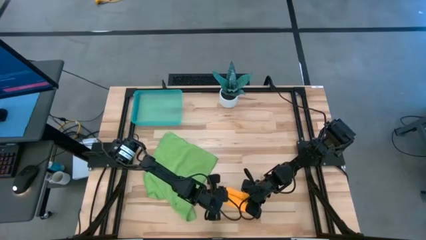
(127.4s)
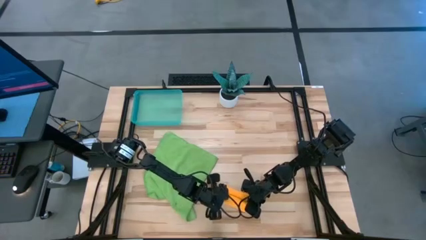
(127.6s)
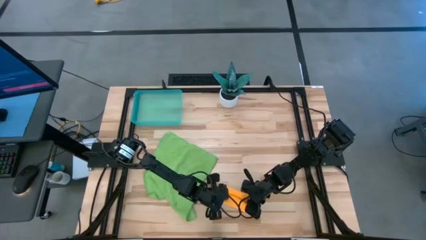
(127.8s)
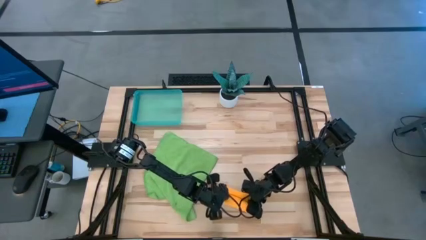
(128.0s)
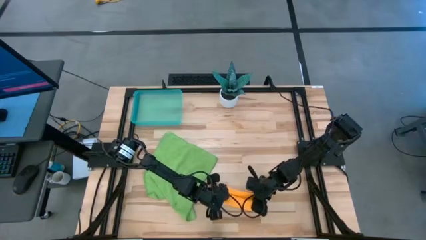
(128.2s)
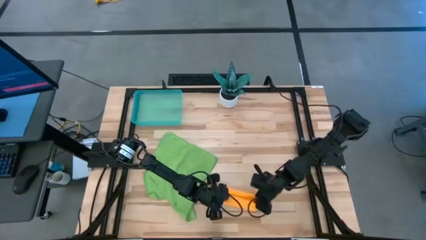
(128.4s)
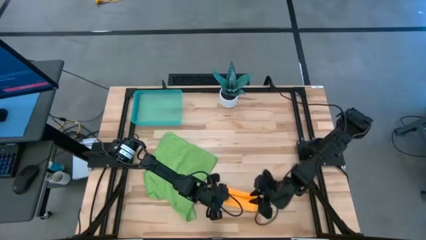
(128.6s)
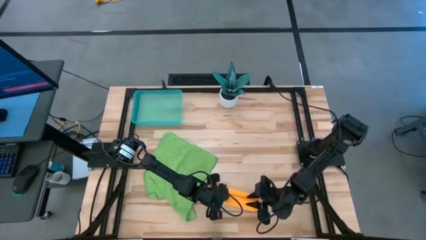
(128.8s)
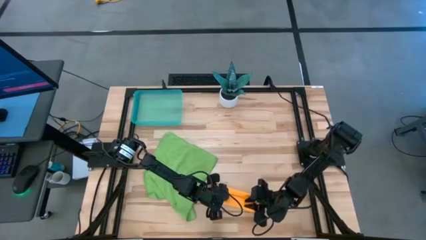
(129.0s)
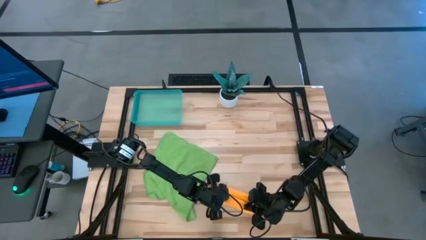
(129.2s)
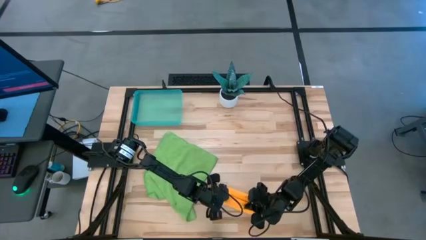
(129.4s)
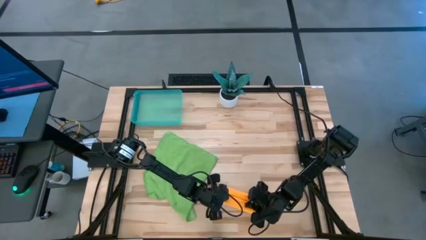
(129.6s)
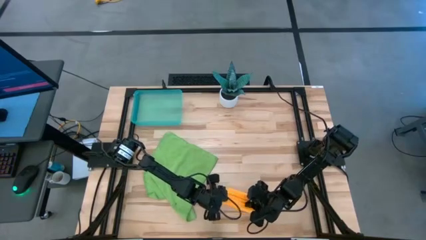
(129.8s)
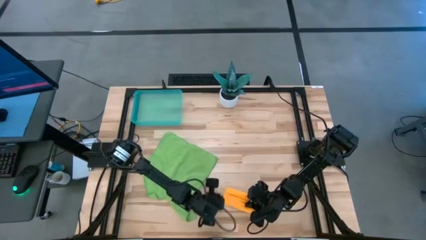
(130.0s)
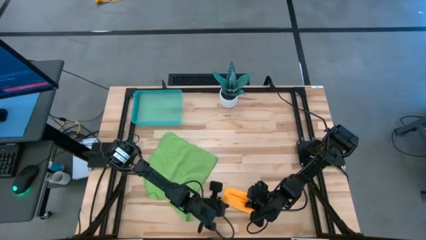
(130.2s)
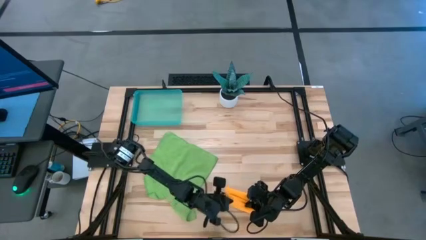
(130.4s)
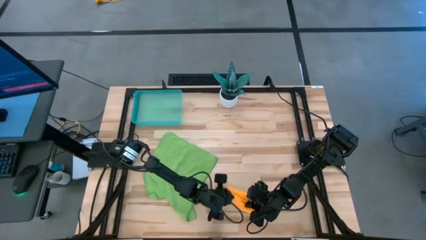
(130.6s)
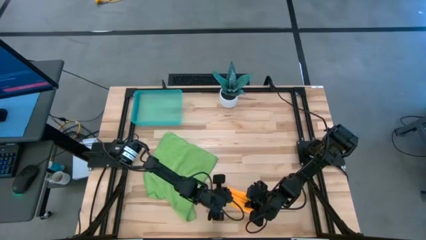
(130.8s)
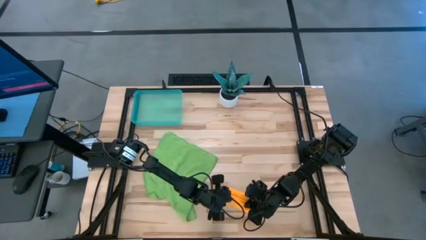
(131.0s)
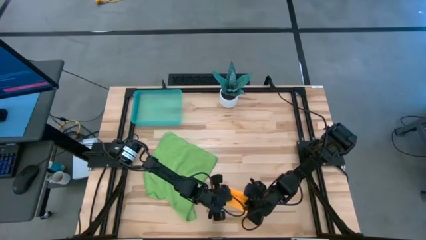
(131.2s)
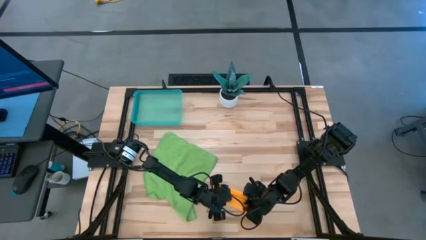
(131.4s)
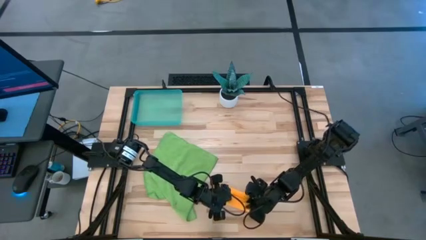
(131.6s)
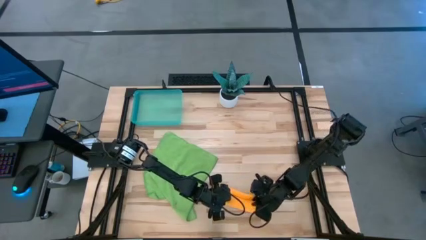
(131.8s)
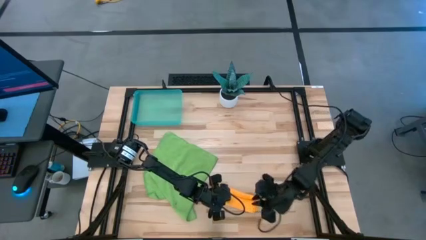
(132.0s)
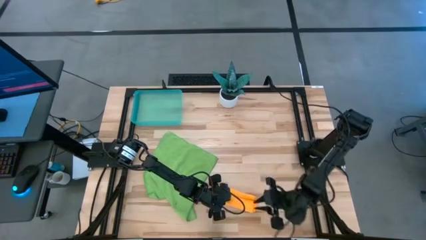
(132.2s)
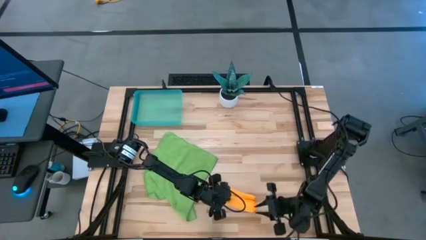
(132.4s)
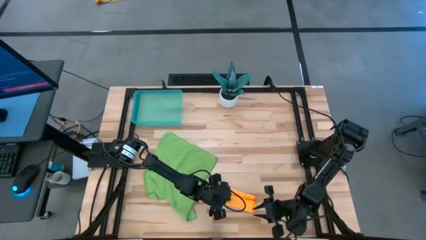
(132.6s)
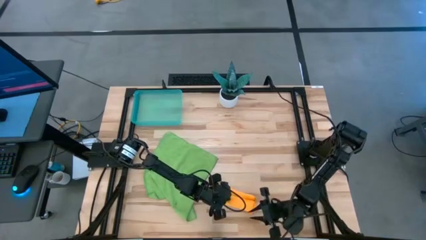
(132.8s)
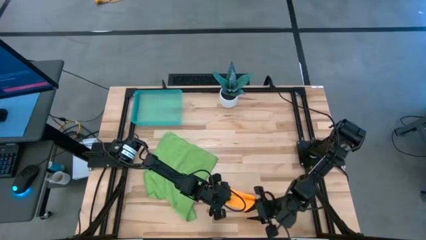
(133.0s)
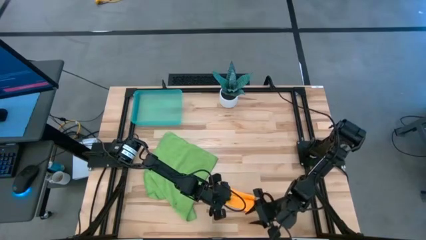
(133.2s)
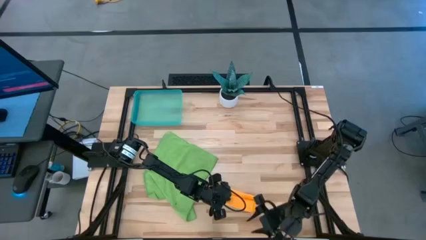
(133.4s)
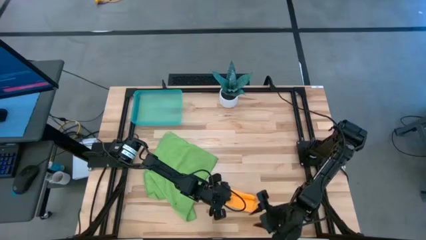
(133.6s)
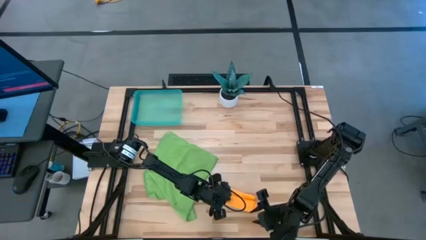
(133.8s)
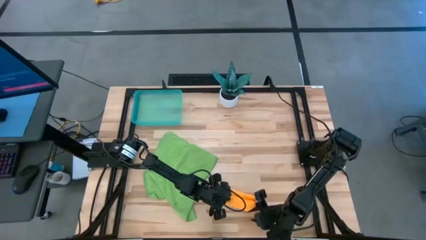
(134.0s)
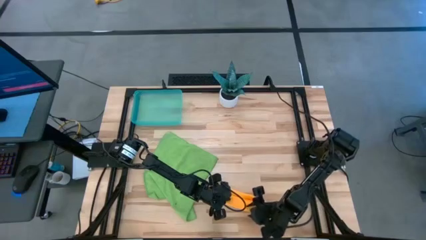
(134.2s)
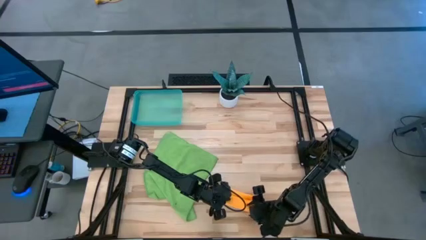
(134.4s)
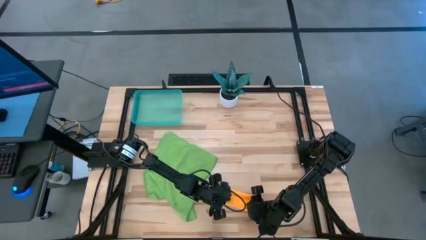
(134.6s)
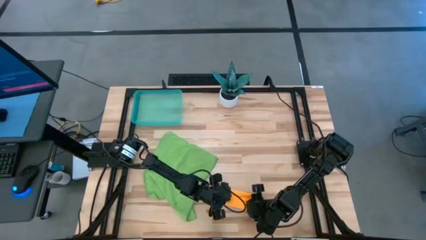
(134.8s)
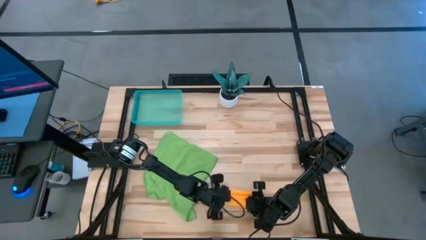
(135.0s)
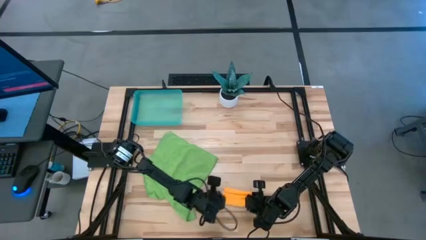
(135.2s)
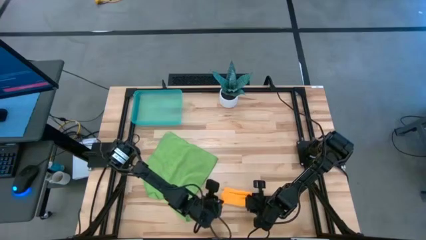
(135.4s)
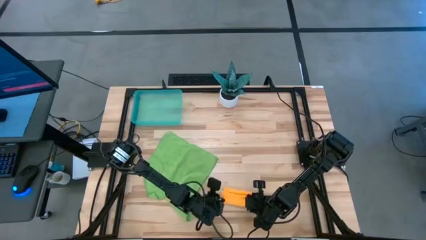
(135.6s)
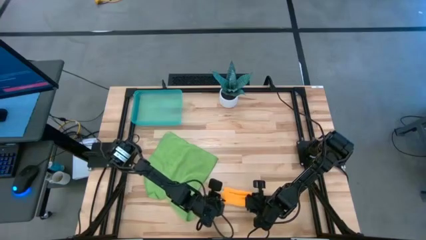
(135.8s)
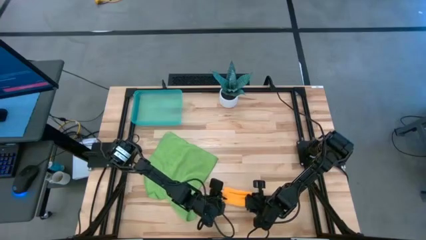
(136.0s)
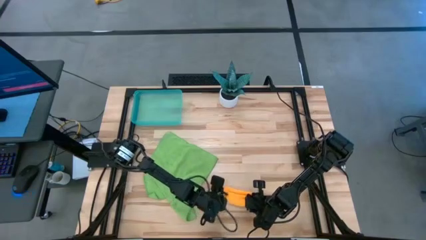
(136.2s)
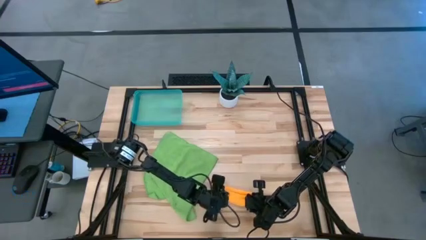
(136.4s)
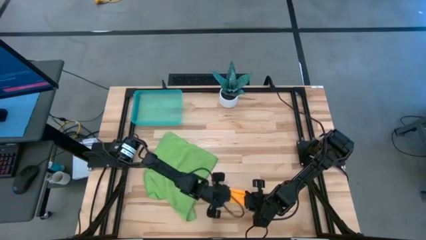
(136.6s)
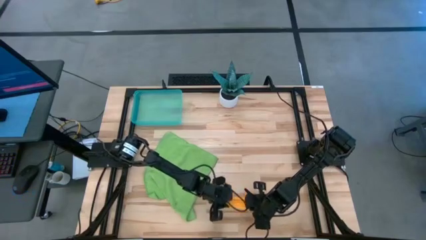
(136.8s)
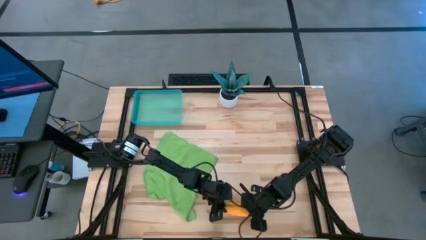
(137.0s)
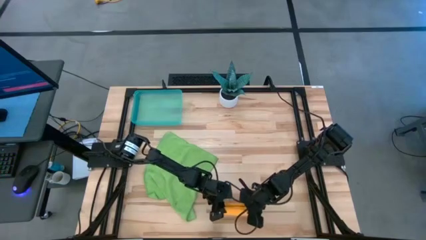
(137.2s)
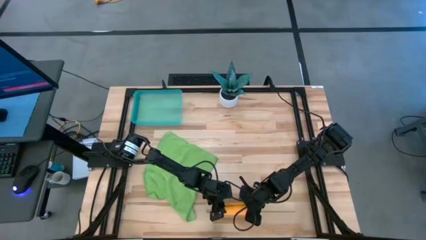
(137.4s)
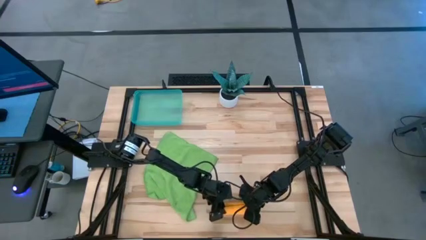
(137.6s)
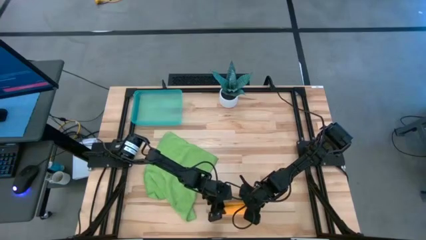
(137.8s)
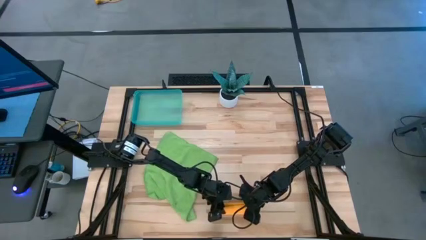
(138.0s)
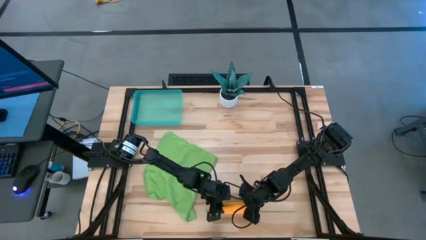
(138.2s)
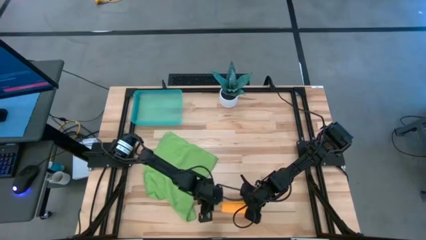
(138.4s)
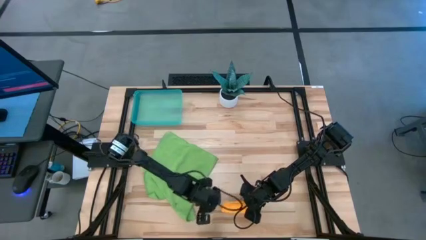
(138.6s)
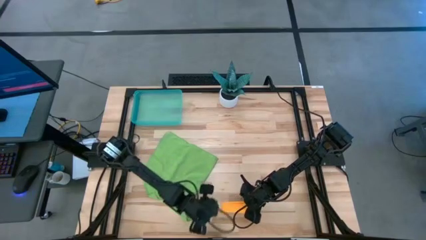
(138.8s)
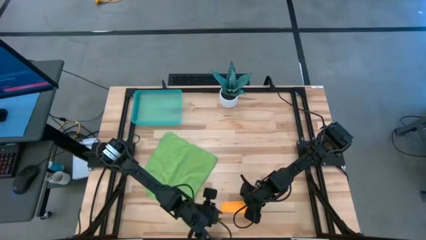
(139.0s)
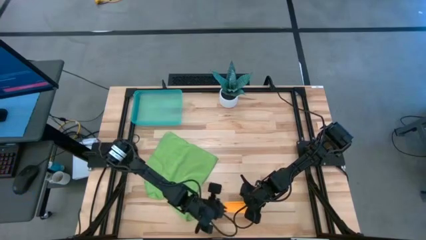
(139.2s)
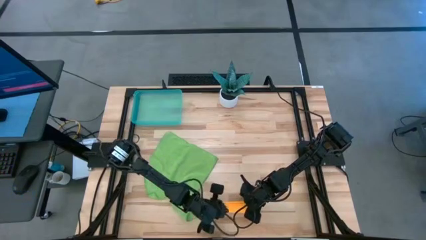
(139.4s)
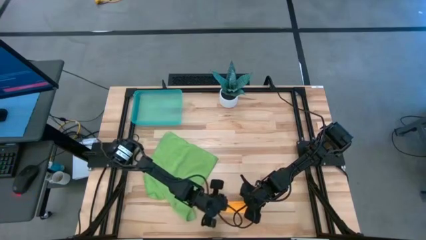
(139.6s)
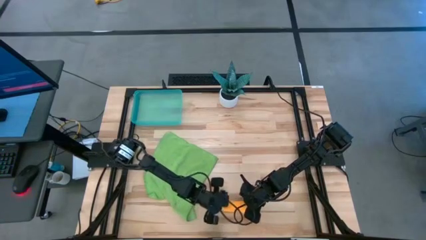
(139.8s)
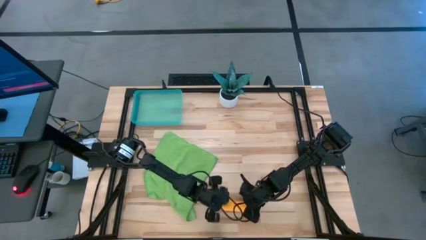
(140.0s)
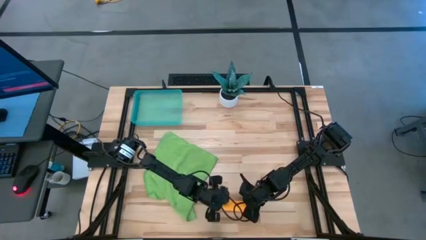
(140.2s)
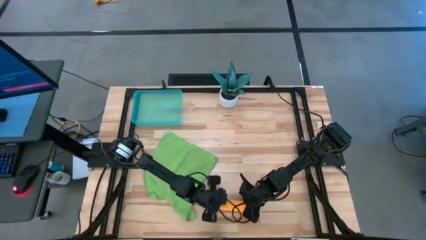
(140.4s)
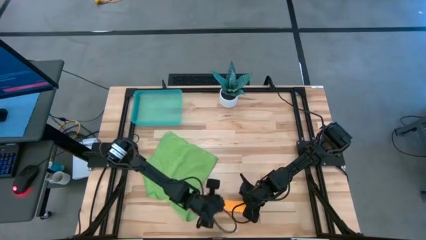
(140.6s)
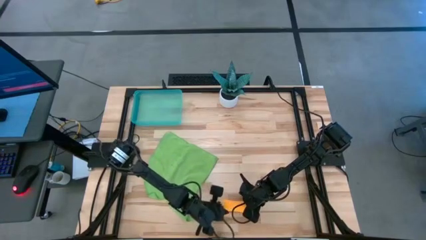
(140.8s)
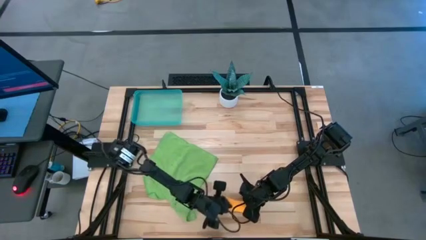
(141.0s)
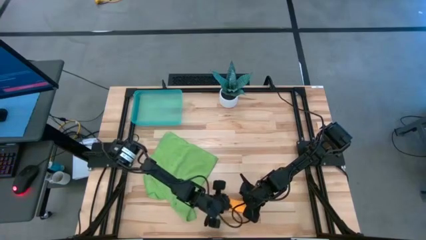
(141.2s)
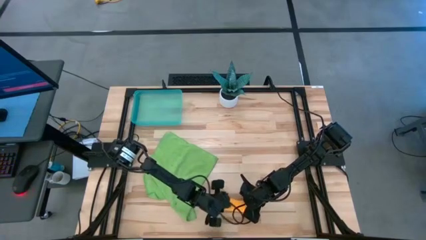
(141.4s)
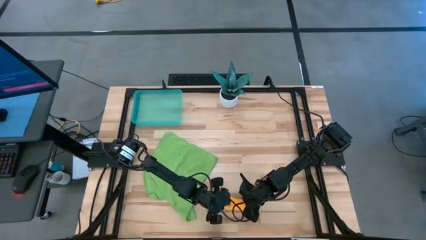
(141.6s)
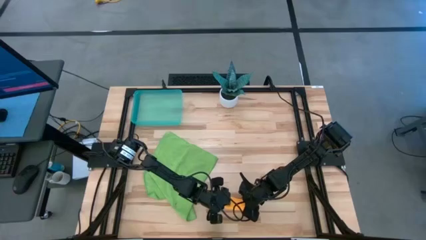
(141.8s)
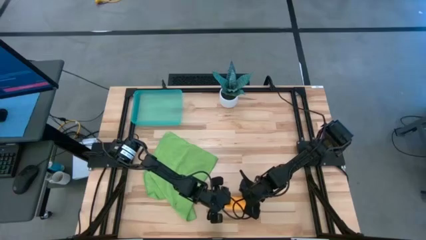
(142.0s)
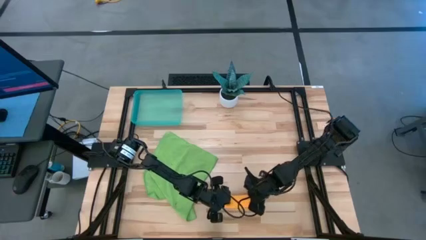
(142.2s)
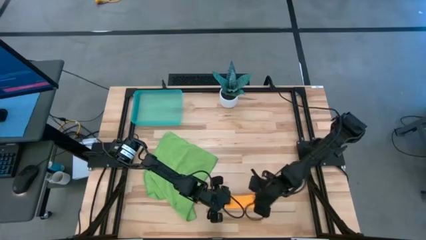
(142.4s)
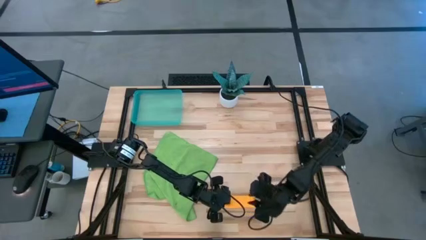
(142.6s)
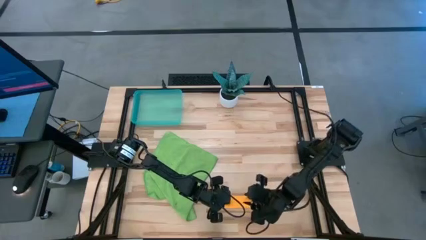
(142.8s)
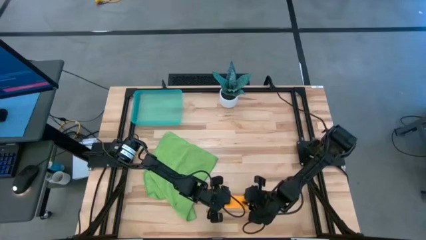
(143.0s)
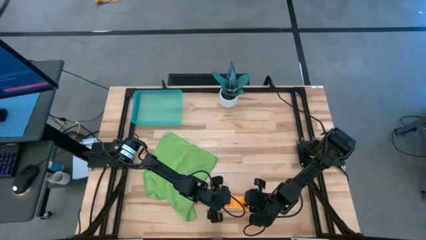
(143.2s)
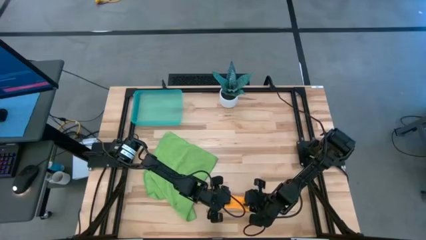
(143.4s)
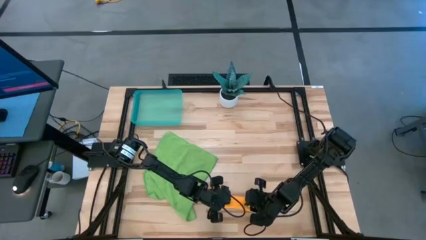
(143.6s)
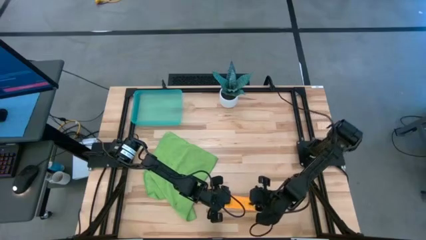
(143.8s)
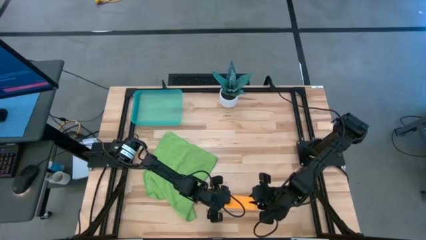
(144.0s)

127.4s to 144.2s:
Task: Roll microfiber towels into tight, uniform cylinder then place into a basket
Roll the yellow microfiber cloth
